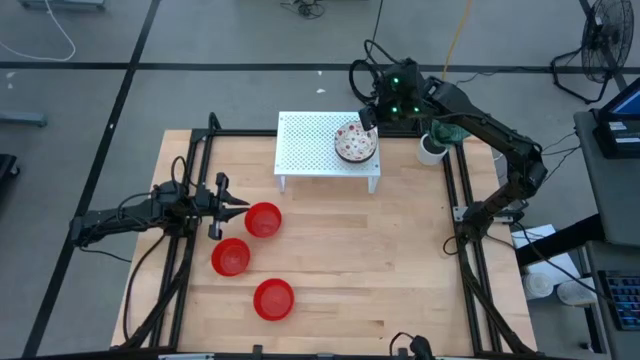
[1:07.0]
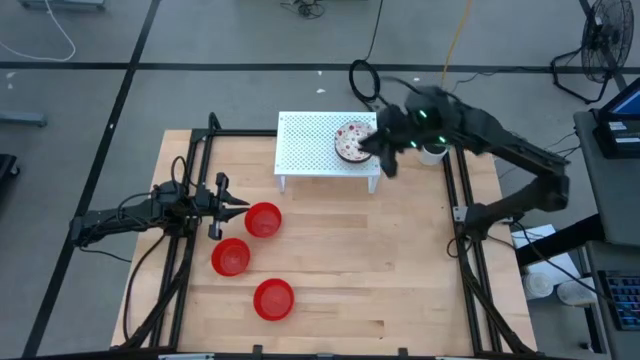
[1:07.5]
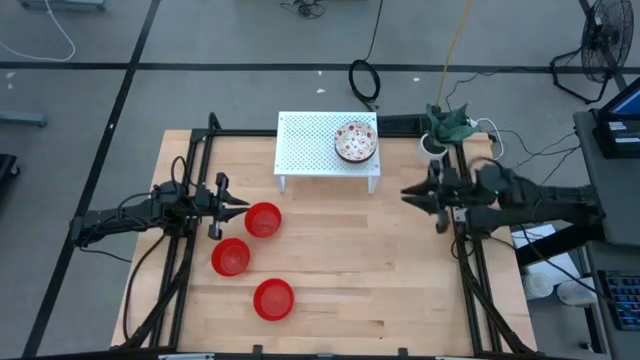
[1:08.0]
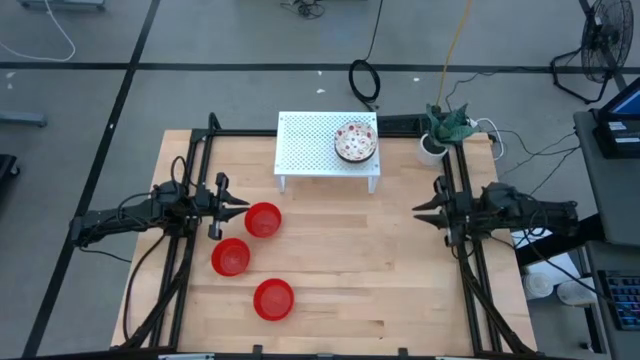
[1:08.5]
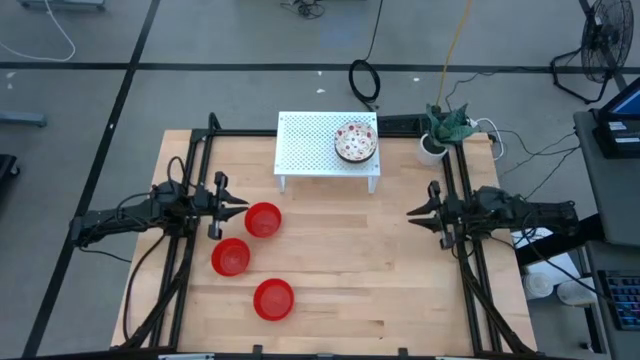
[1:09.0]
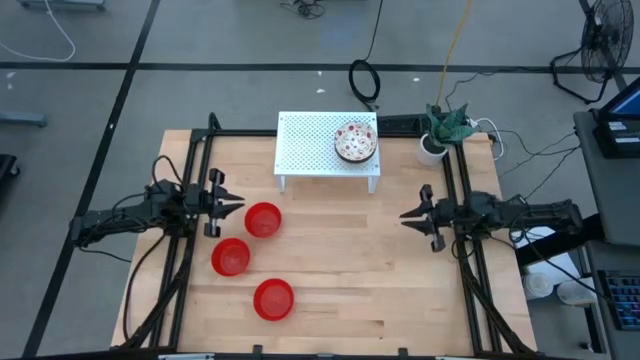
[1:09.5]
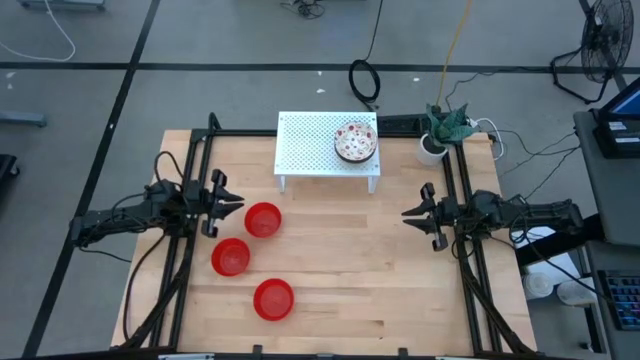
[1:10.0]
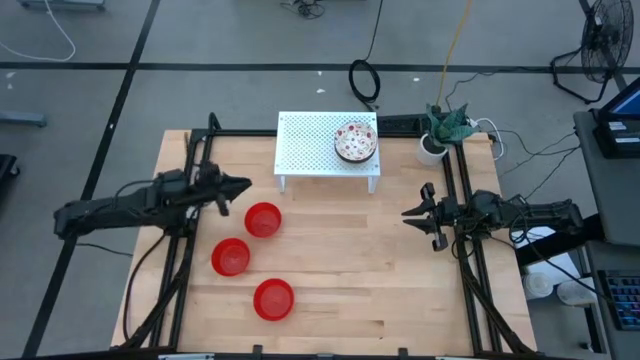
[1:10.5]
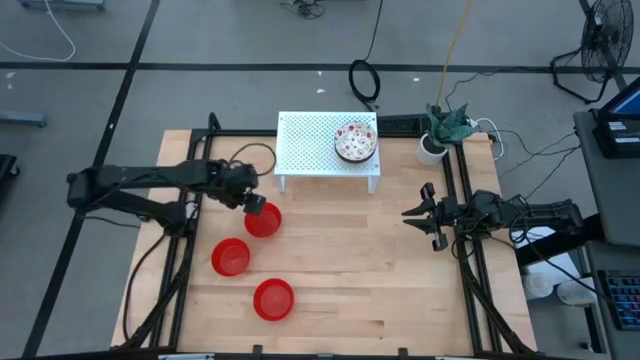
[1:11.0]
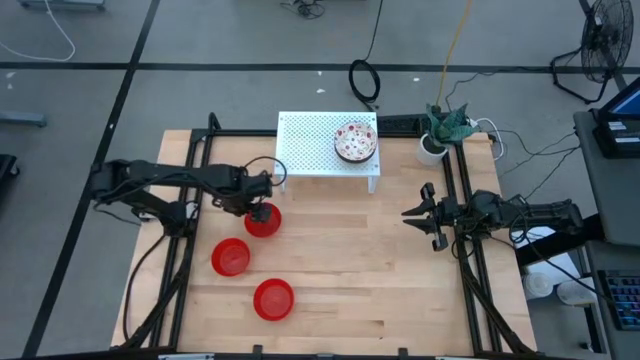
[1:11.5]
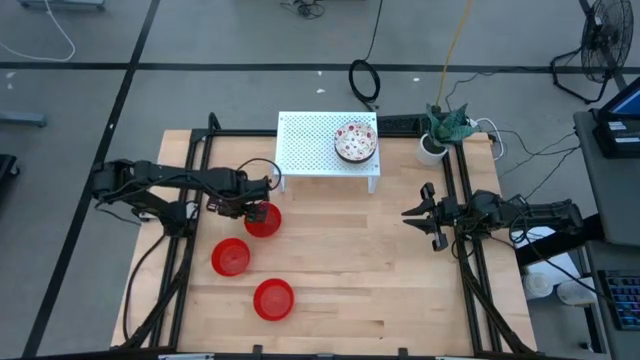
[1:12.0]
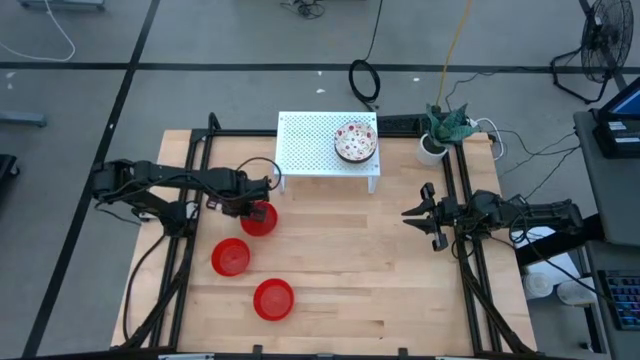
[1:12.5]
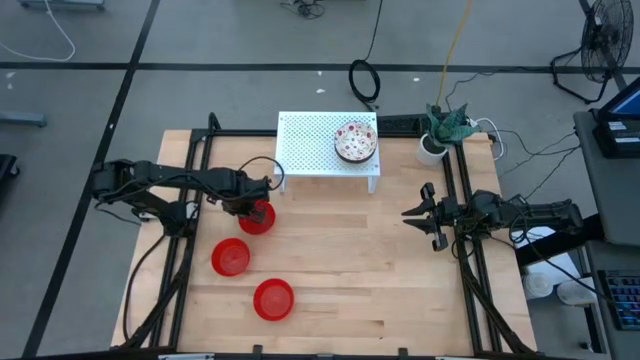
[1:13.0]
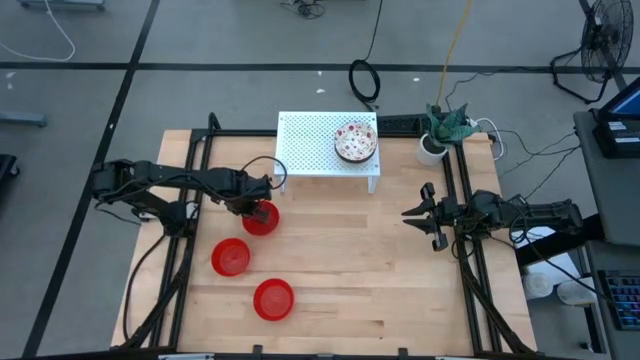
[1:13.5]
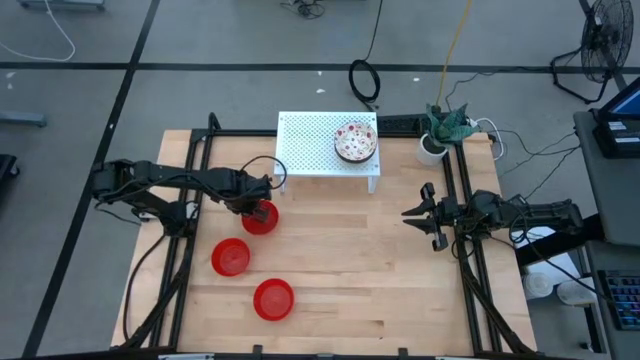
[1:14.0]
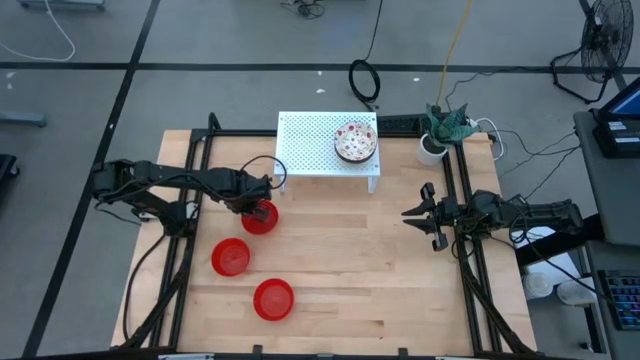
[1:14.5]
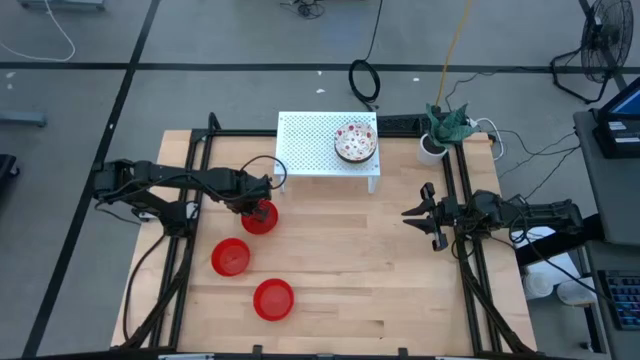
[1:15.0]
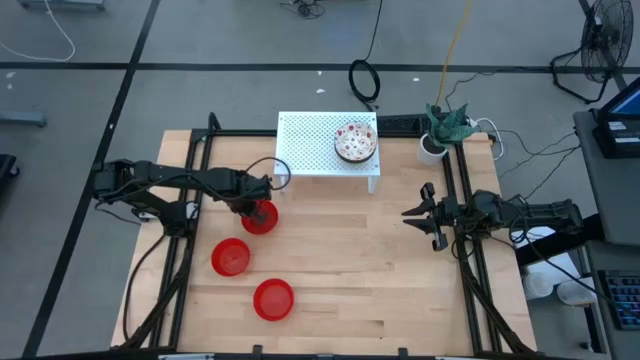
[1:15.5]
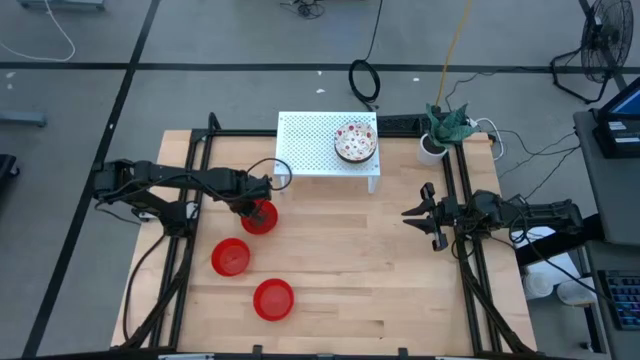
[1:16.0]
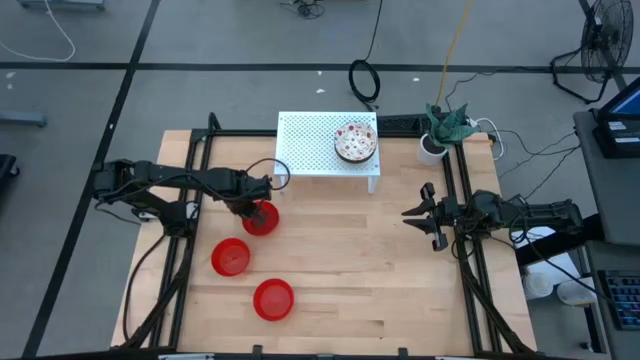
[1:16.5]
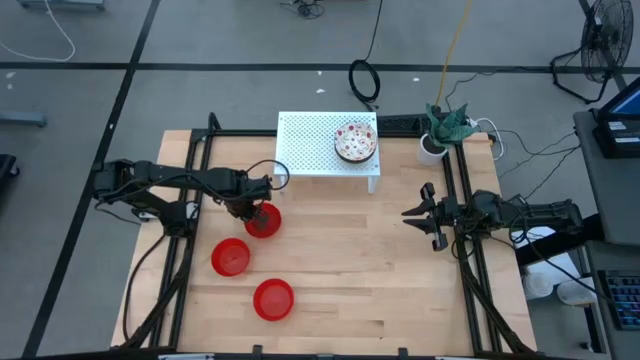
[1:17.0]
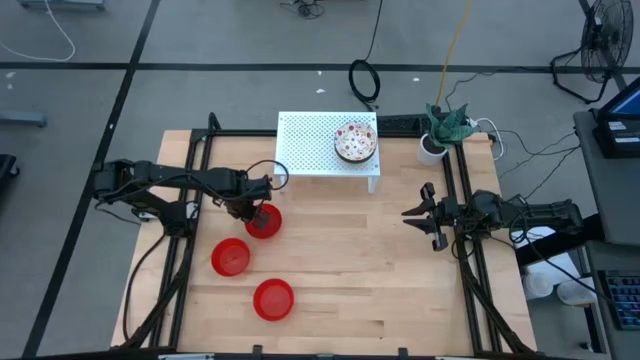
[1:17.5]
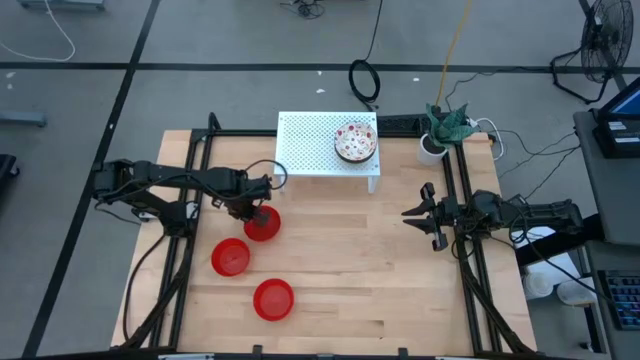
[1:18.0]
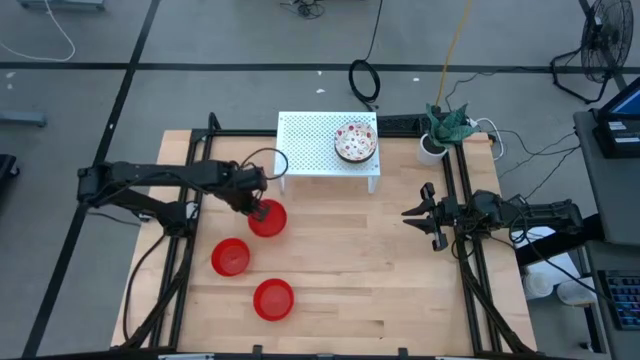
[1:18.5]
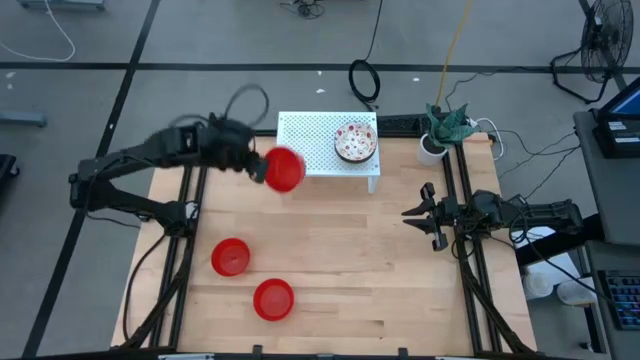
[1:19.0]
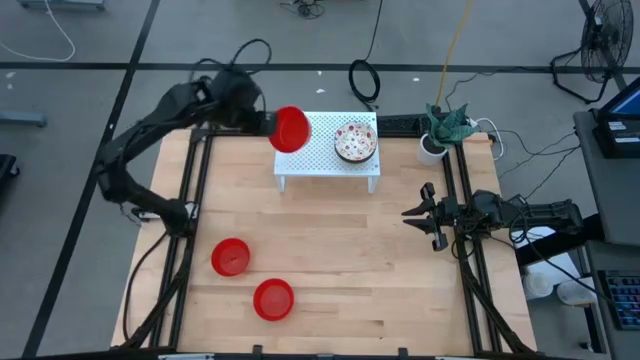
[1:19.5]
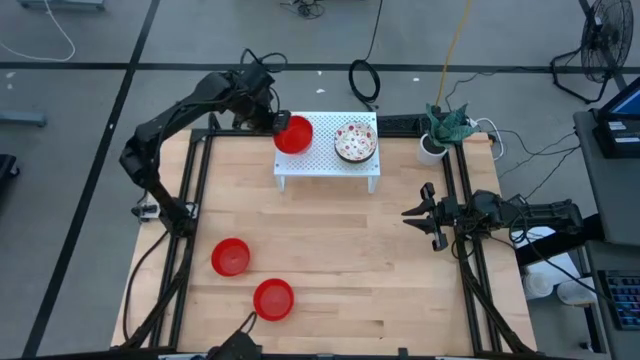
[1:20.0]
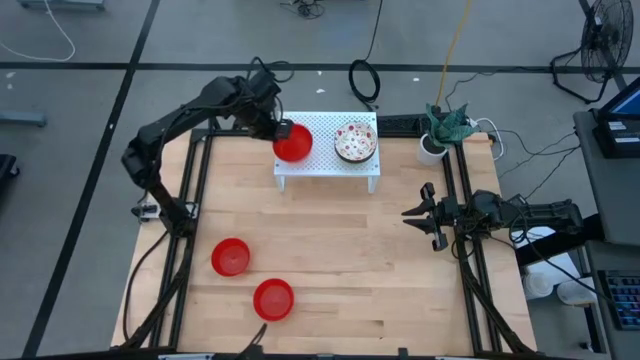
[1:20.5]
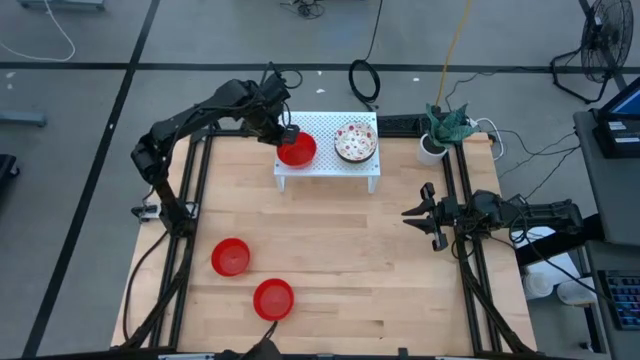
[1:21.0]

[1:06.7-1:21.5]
Task: Pick & Place Mini bowls
Put the top red bowl on the shelf

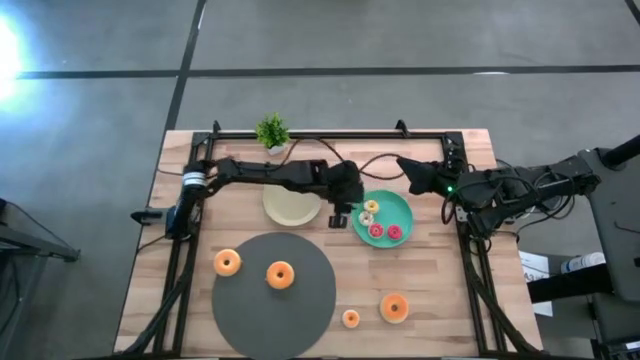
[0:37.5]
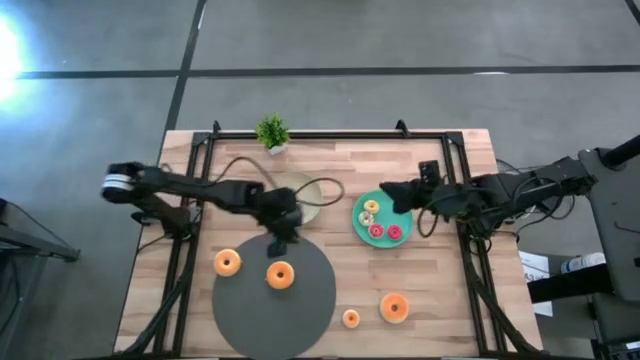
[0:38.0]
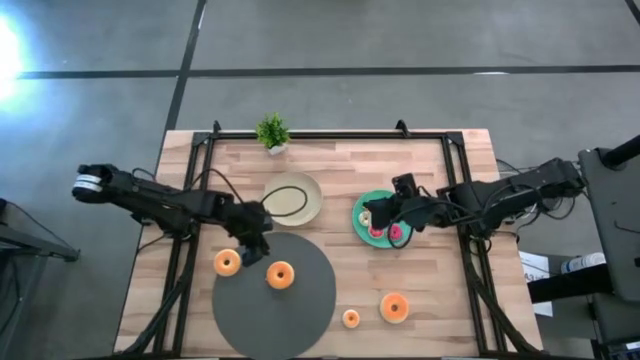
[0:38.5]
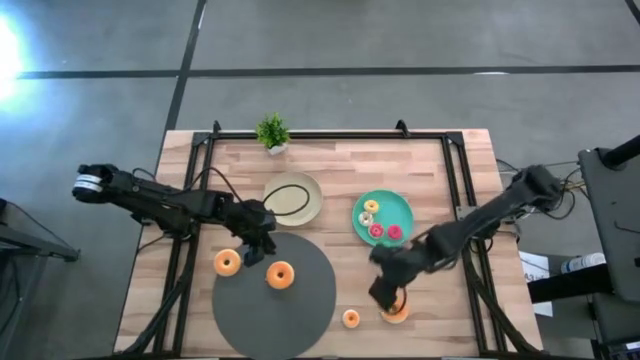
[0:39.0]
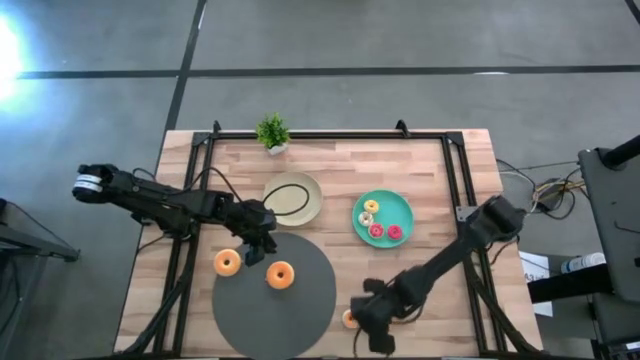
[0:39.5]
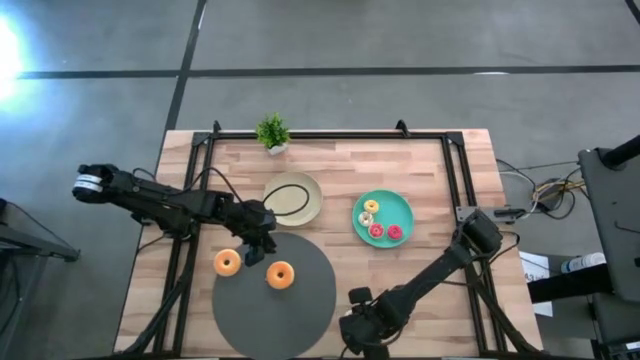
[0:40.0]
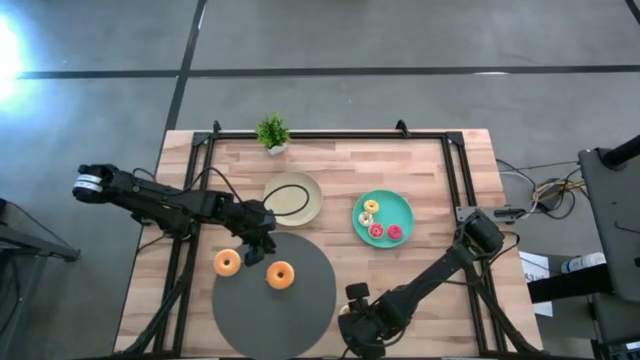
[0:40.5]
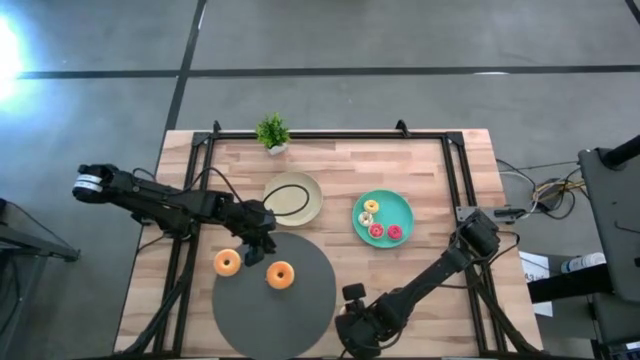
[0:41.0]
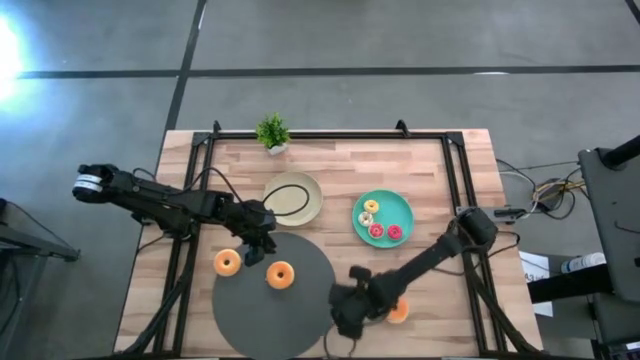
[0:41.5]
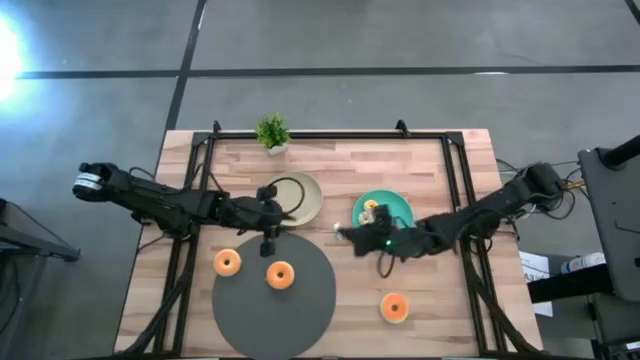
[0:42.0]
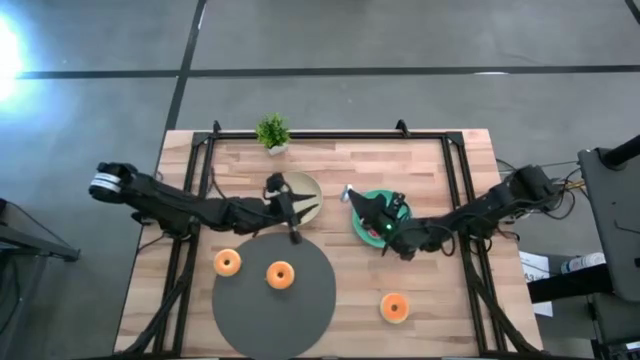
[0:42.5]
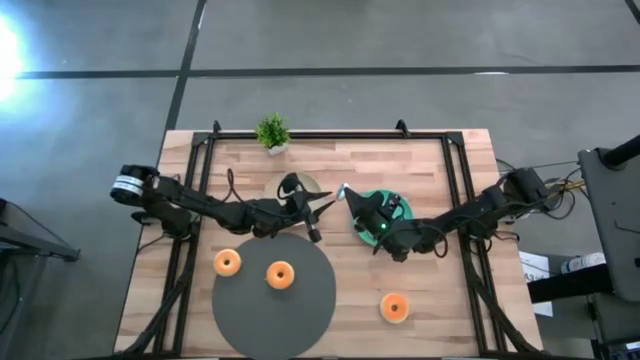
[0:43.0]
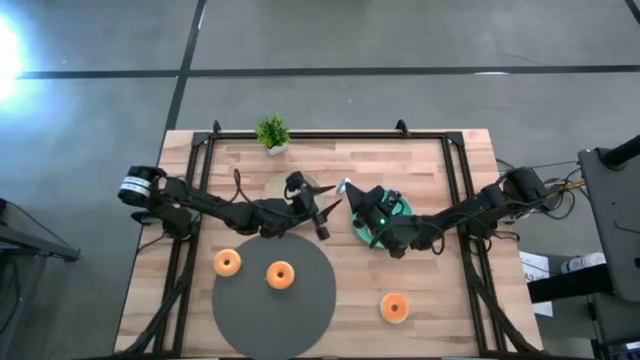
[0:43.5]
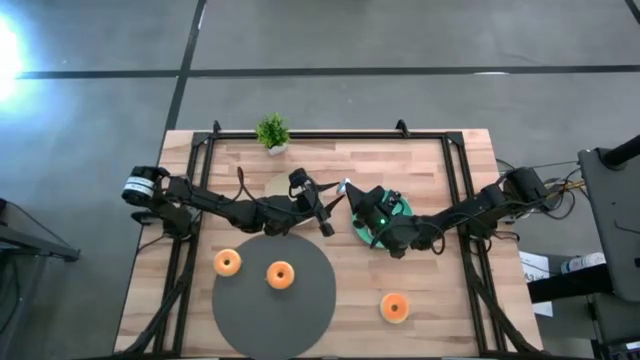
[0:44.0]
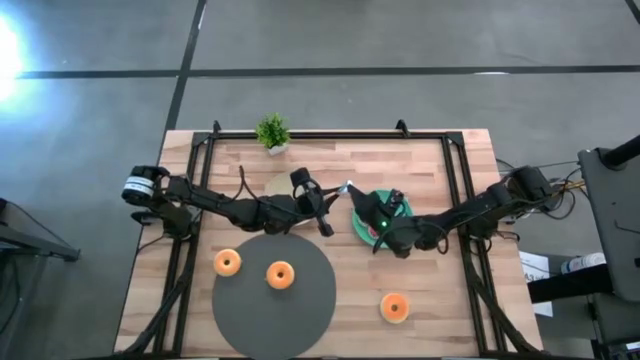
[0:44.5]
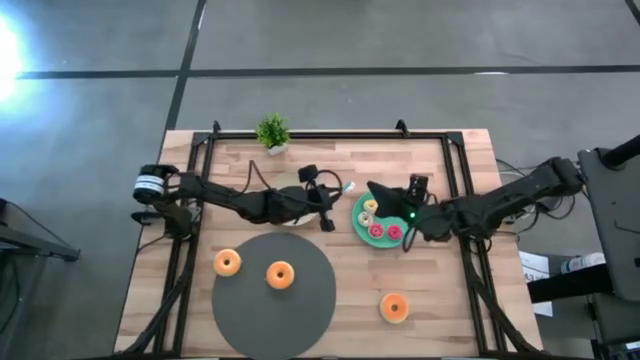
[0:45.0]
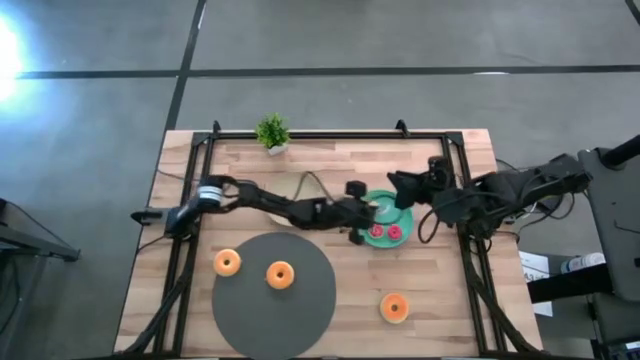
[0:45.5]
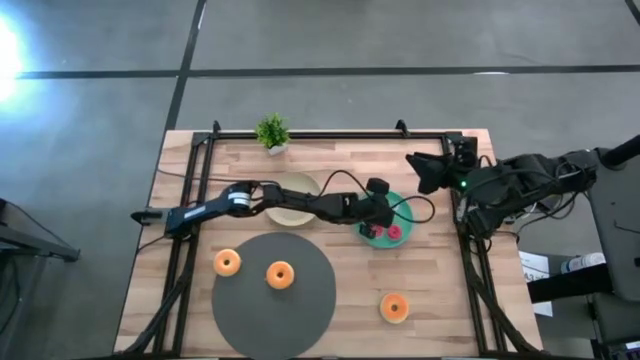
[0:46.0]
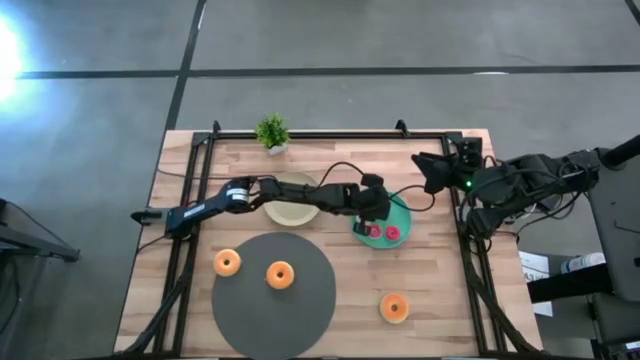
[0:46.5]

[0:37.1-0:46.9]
Task: Pick & Place donuts
Put the small blue donut on the blue plate
